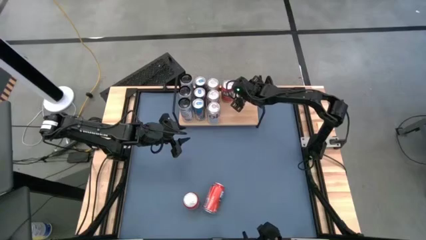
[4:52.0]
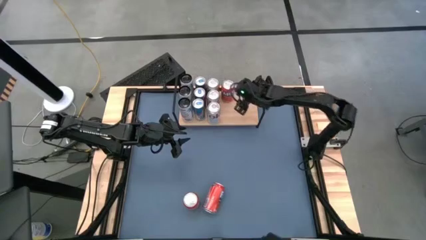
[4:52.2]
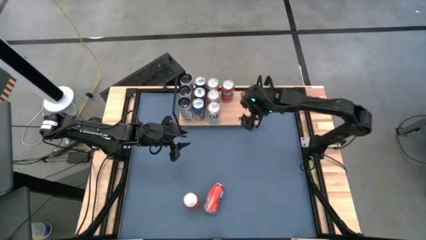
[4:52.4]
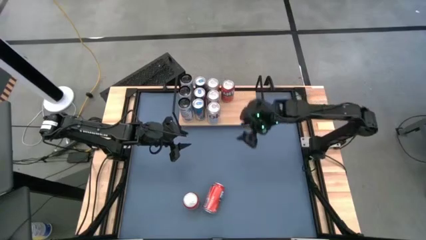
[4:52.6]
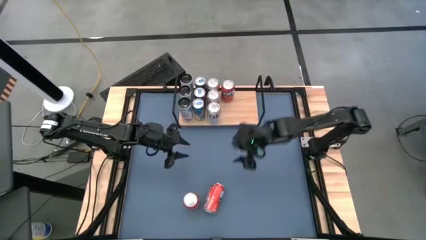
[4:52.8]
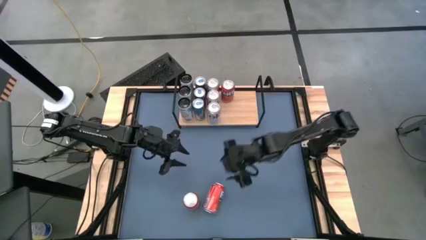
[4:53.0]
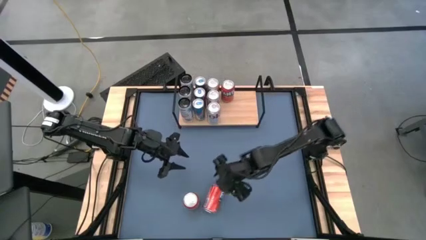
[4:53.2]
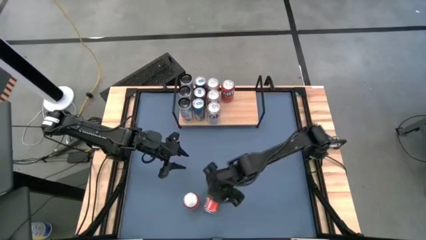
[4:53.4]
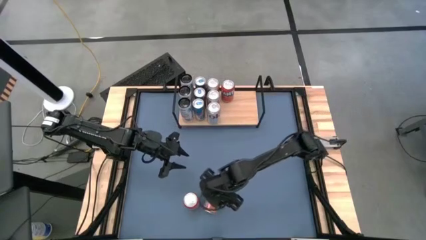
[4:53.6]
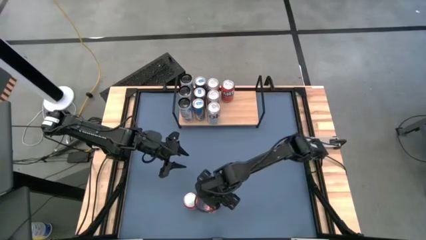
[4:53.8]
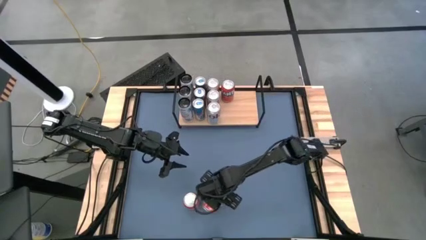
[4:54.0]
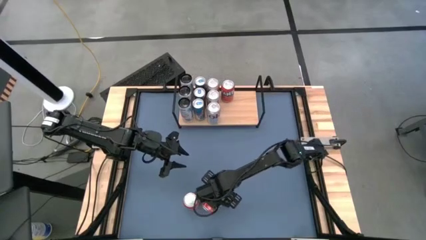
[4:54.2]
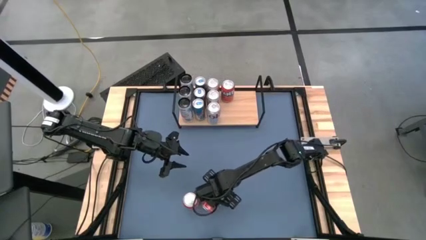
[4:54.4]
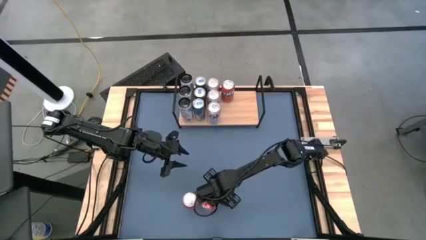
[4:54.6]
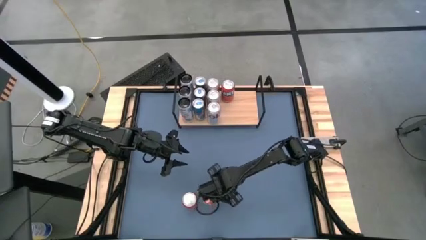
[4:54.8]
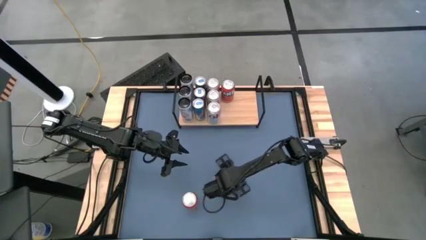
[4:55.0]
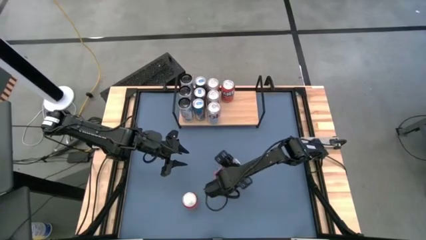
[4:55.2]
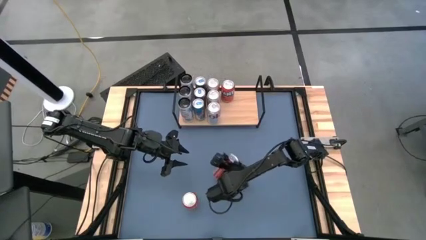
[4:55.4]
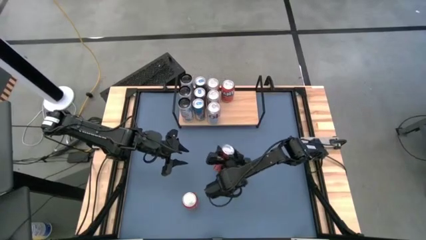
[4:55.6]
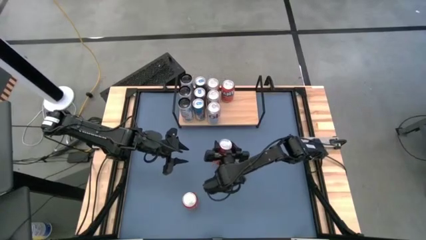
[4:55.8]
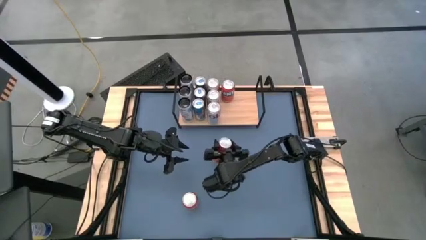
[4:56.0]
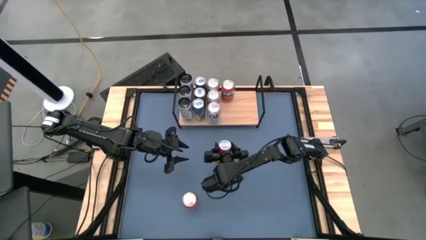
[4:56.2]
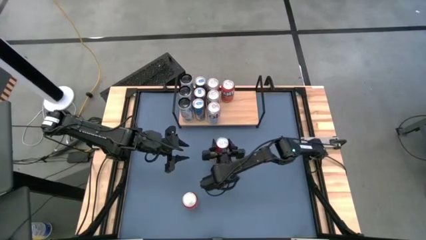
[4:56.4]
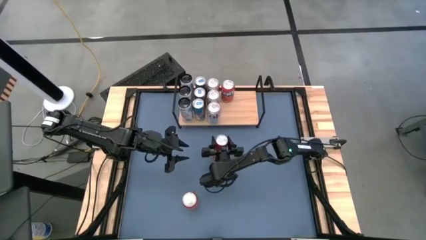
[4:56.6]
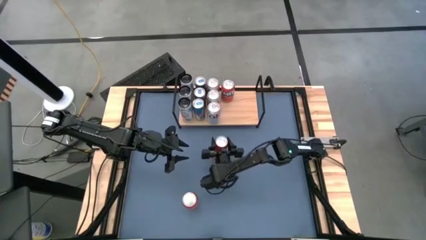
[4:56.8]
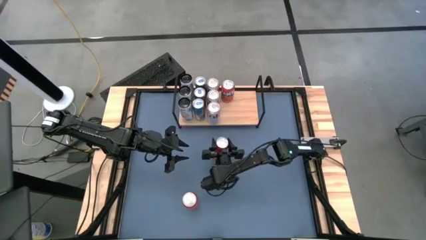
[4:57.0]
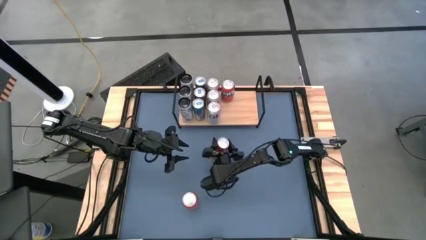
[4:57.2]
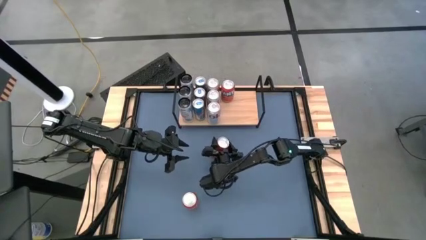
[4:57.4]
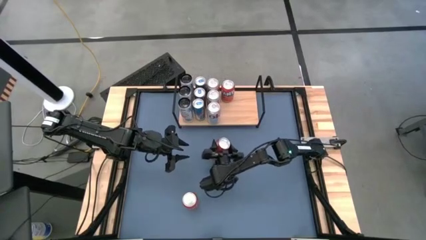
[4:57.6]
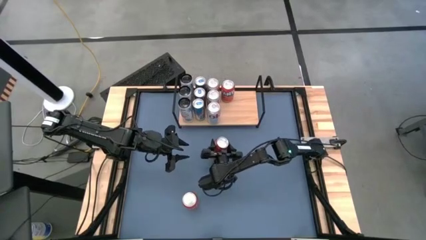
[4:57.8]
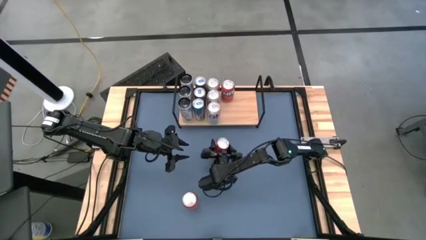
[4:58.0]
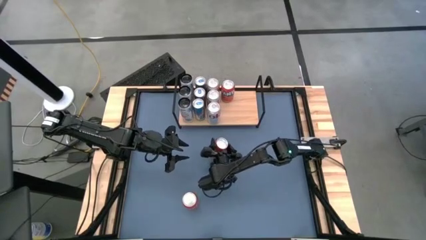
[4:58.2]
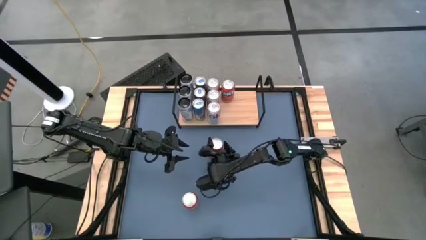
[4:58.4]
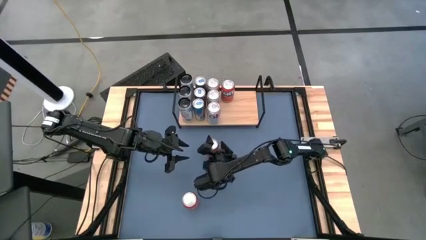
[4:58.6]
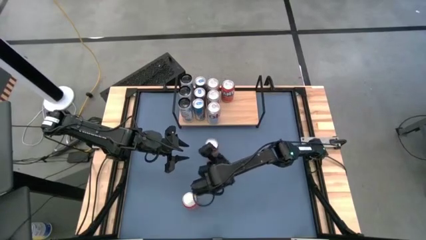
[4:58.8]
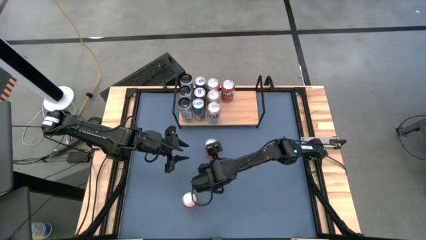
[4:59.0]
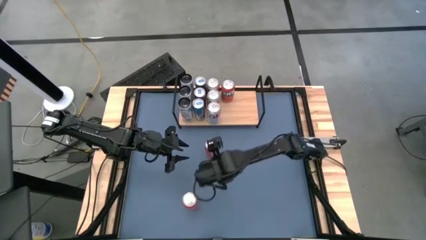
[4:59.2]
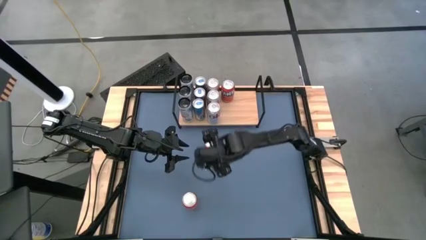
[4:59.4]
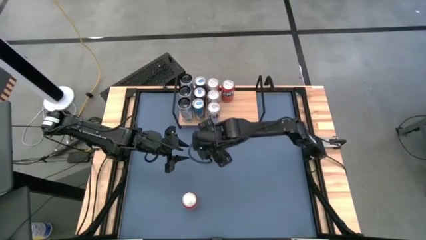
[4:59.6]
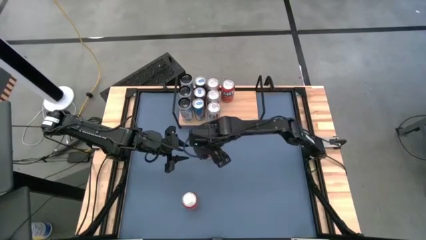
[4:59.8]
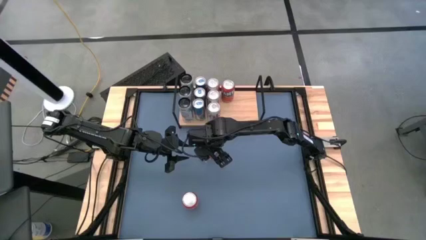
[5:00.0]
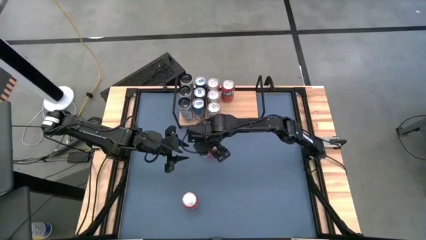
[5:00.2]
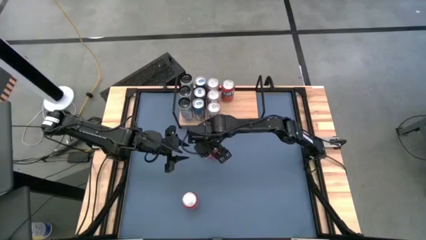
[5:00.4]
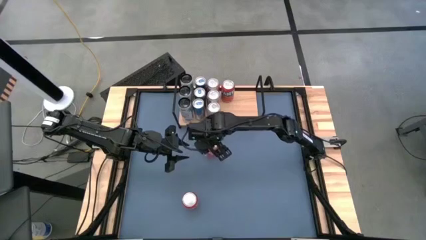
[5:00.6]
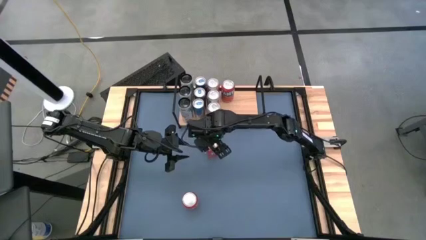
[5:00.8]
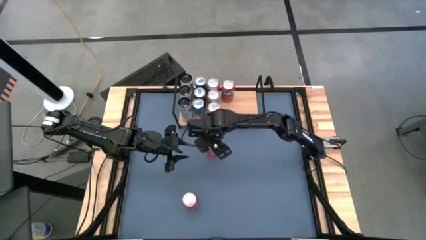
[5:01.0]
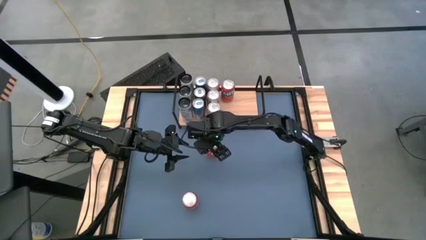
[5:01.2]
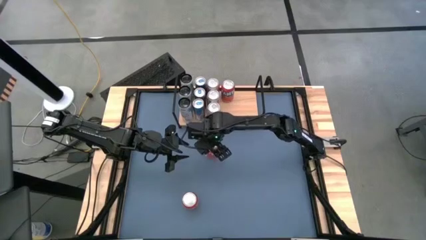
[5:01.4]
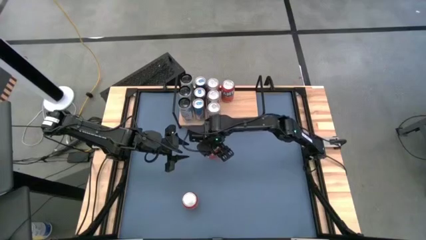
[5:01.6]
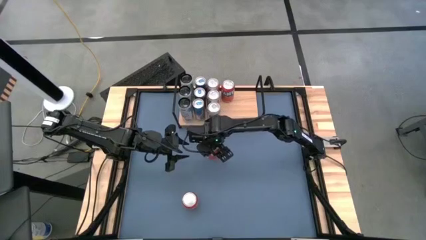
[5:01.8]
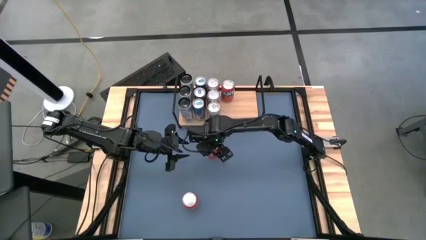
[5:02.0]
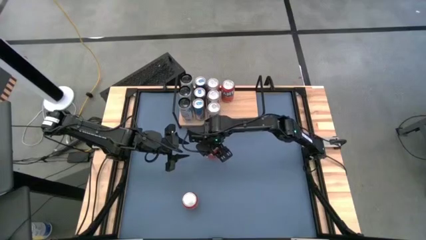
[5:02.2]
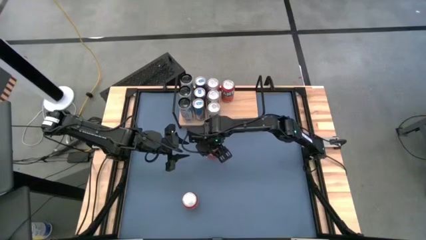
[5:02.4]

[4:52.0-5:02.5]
Task: Place canned beverage on shelf
Put the right red soda can aligned with the other red soda can on the shelf

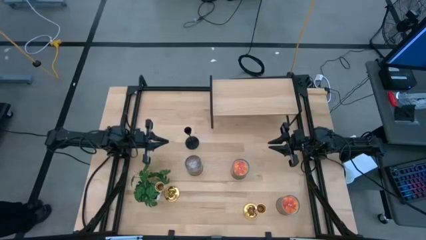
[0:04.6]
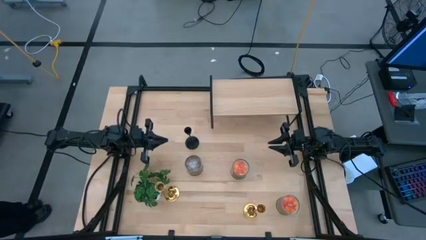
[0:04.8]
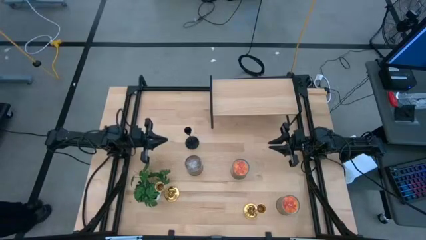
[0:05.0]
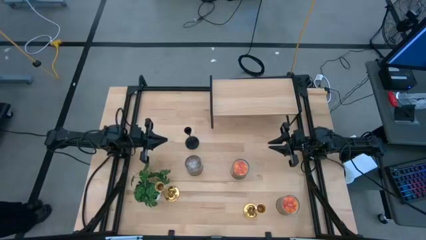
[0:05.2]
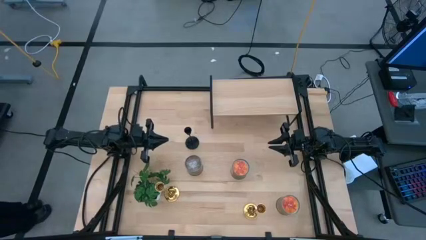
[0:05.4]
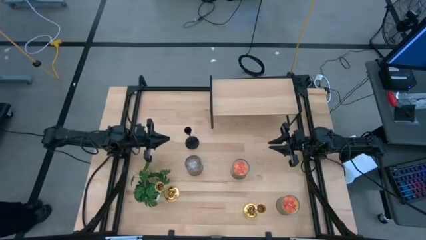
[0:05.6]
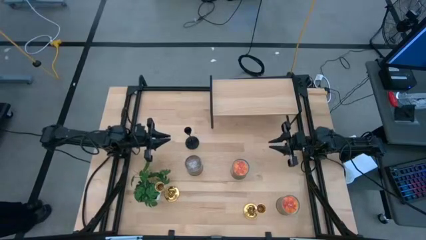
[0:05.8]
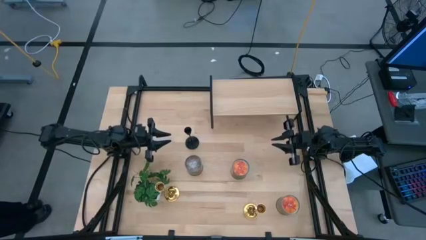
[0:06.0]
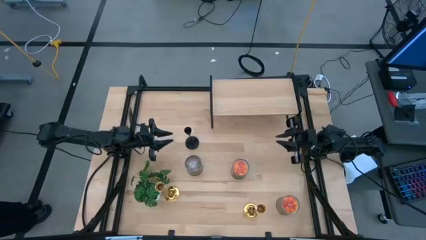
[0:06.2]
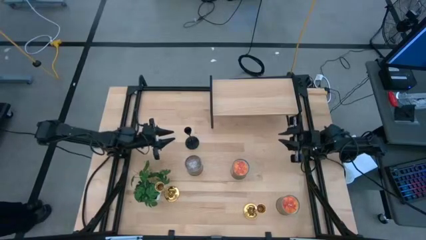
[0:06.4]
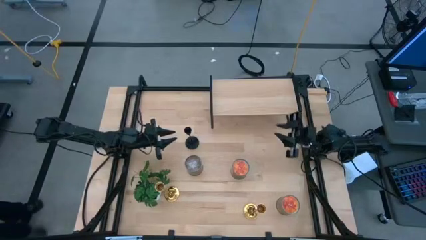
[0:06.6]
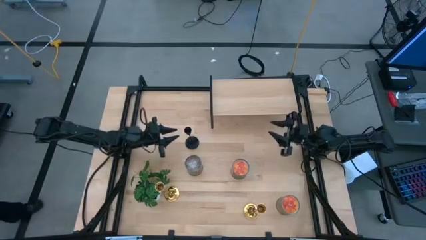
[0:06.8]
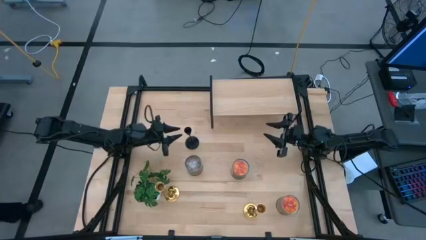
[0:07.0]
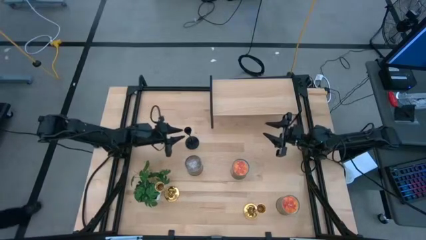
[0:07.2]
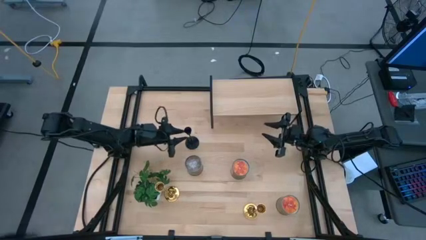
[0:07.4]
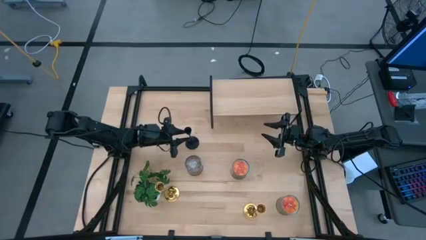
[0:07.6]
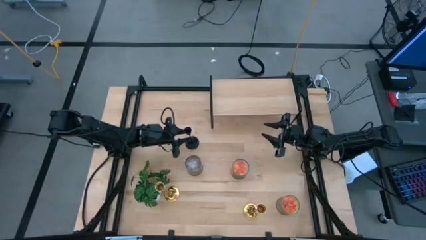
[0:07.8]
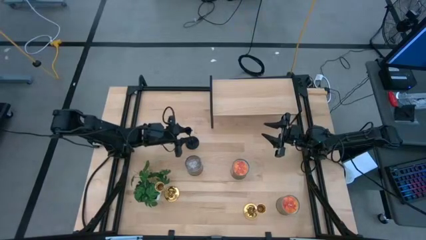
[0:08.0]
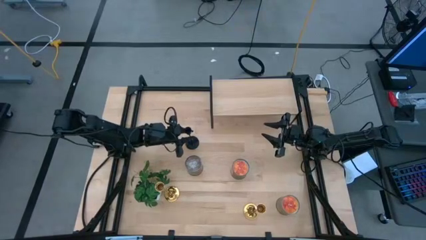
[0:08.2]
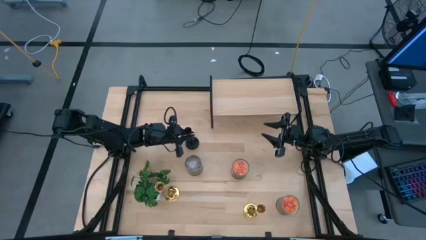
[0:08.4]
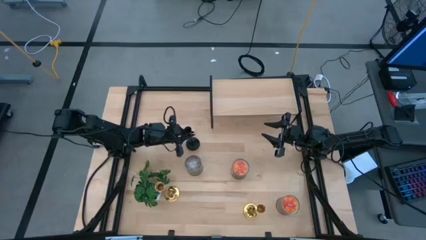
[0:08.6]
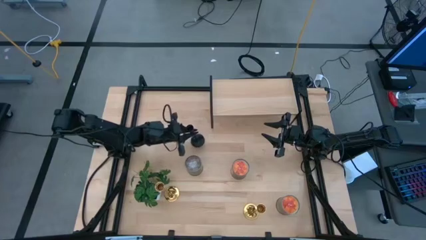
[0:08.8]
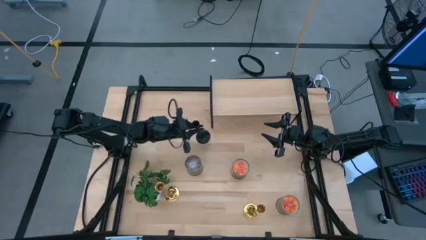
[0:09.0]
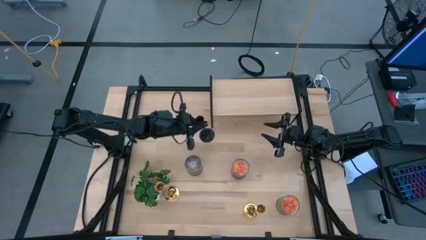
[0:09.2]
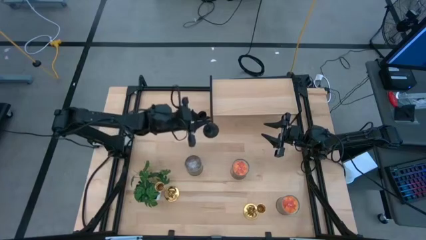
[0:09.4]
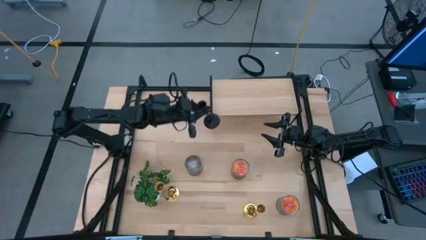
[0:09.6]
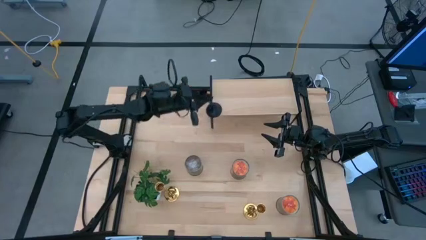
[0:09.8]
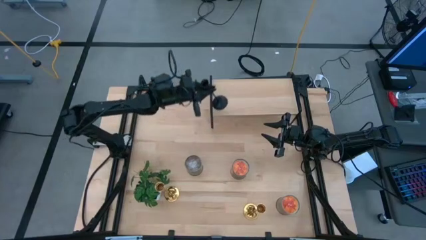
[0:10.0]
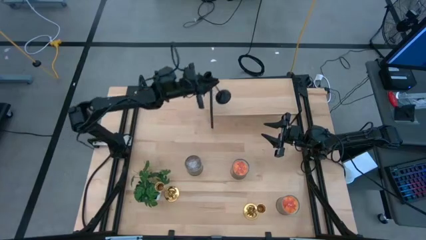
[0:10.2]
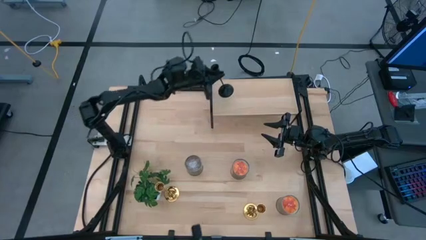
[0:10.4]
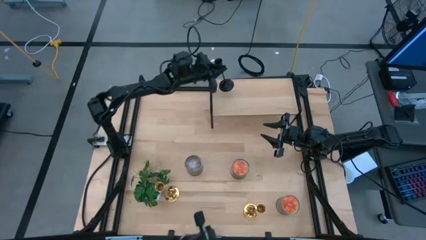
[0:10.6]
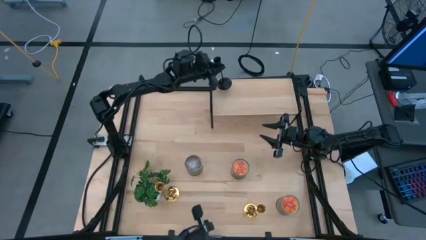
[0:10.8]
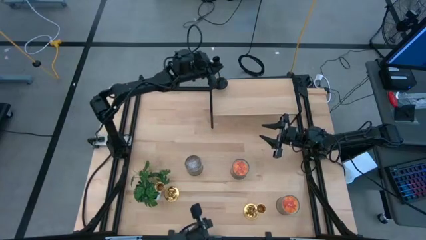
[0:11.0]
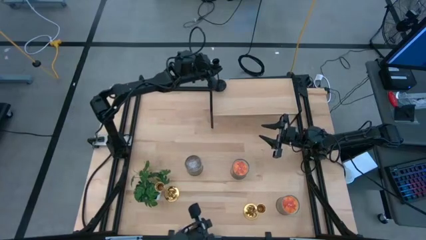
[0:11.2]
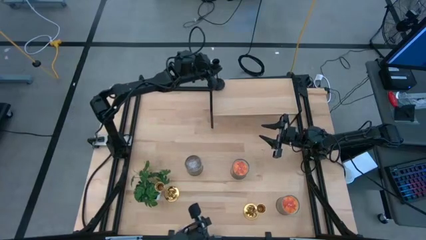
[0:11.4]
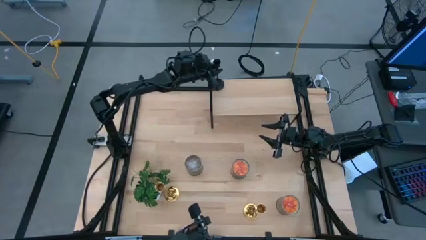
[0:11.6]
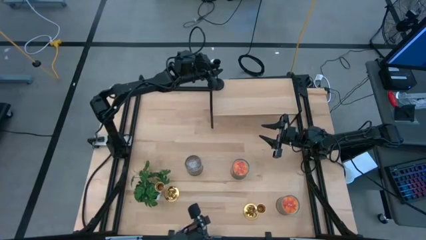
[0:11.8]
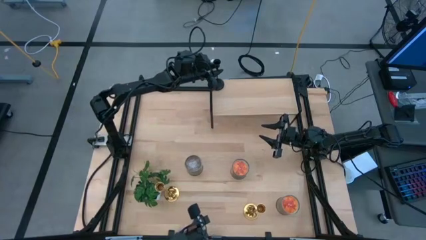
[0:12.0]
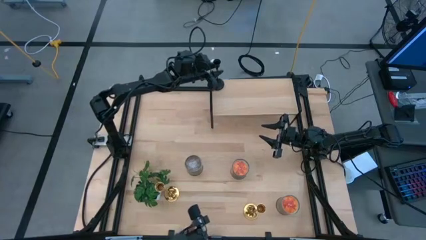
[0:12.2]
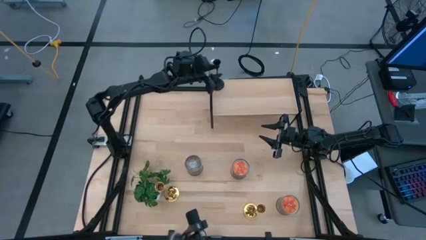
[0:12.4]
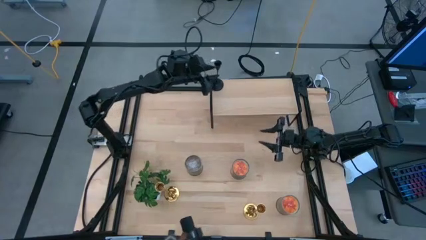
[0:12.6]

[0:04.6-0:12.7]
Task: Pick & Place candle stick holders
Put the black candle holder on the shelf
